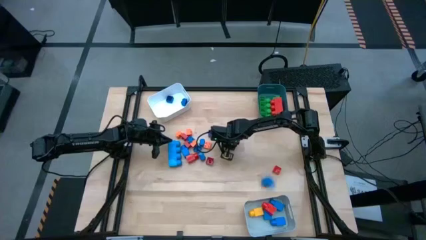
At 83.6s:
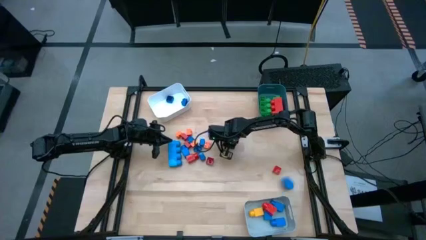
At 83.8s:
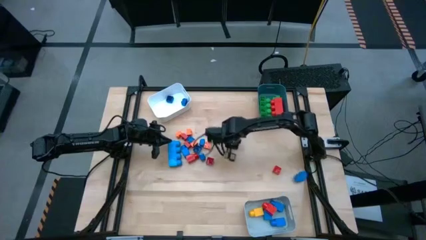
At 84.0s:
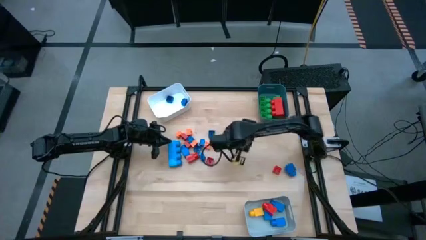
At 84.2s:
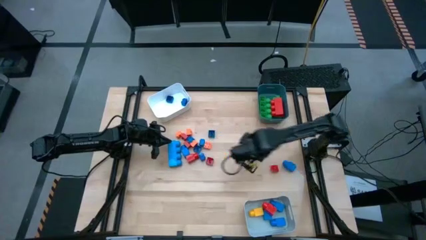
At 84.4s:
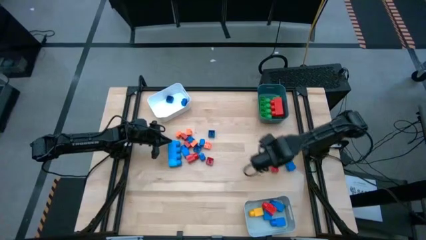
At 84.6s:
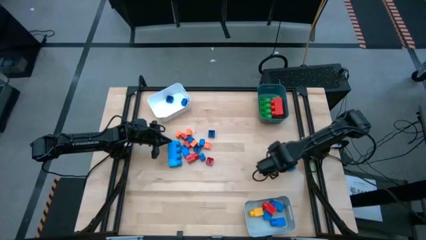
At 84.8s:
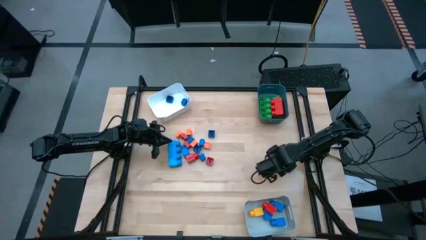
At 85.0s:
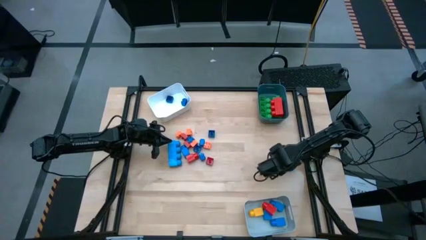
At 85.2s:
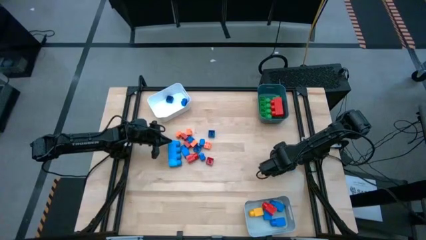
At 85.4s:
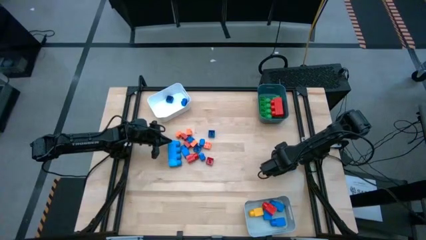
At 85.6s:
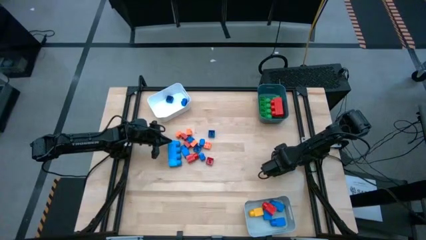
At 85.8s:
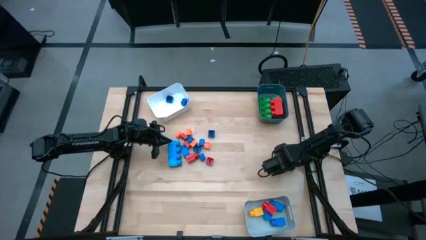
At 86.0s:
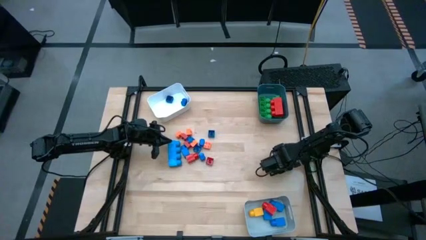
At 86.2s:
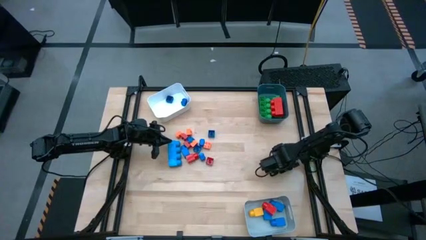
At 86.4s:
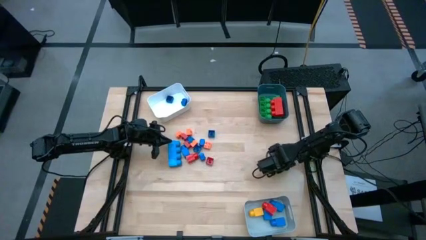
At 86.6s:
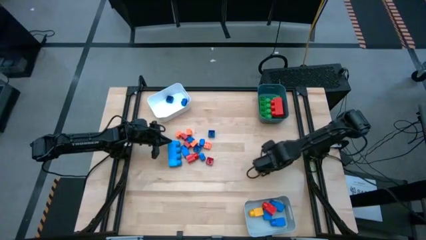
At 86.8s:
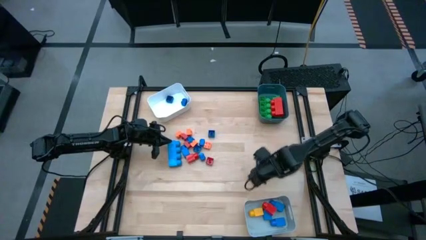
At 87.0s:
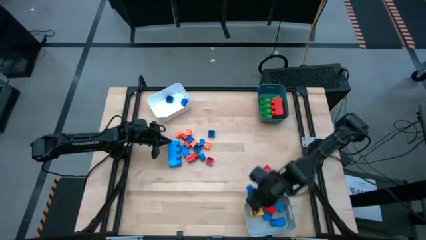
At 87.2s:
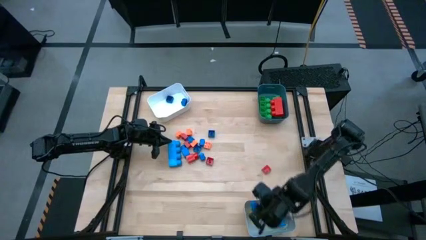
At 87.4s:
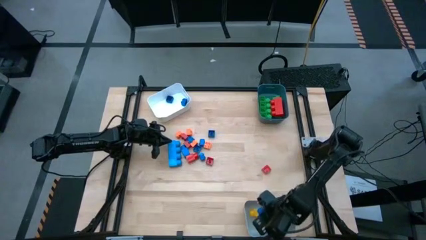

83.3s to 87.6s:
Task: Sort blocks by size
Put the 1 stud blue game piece into the gray bin

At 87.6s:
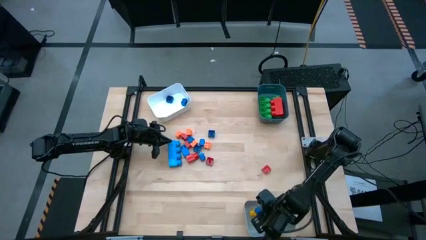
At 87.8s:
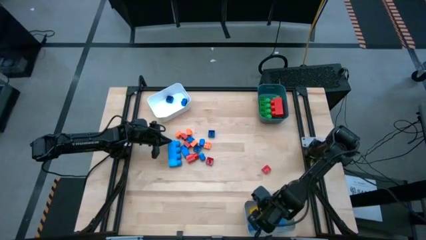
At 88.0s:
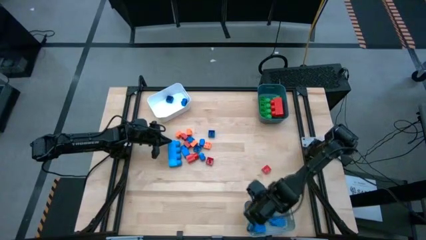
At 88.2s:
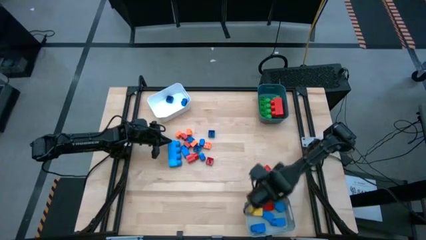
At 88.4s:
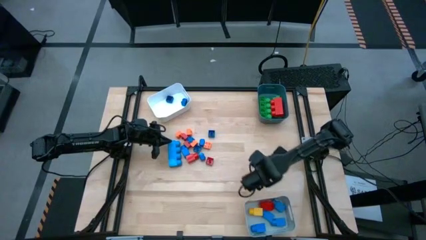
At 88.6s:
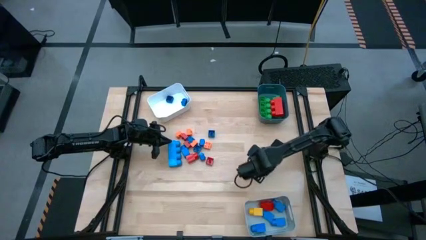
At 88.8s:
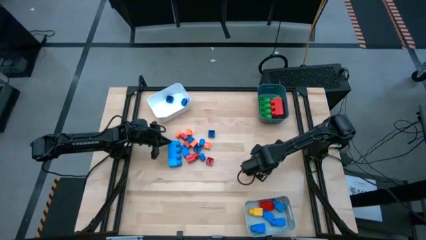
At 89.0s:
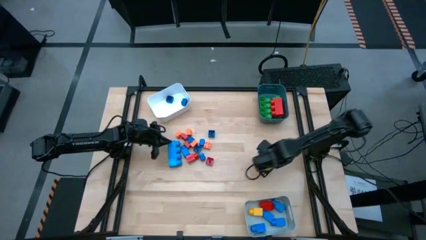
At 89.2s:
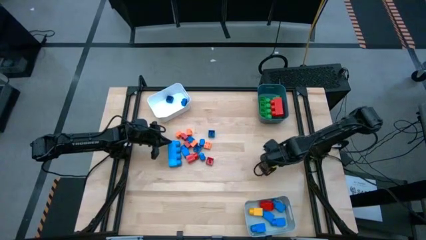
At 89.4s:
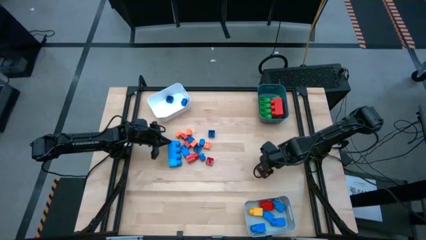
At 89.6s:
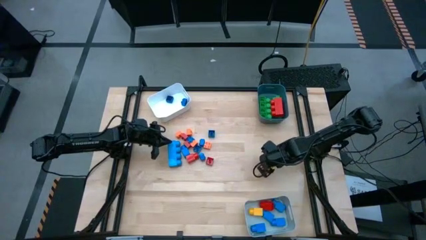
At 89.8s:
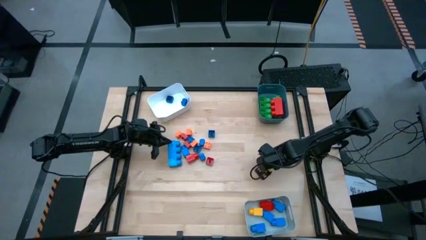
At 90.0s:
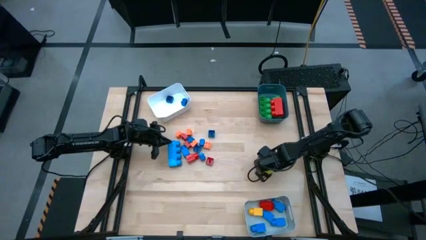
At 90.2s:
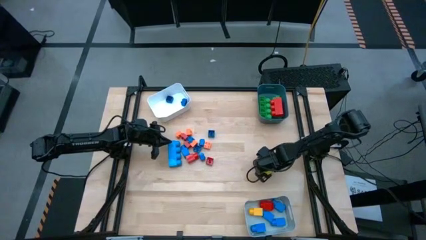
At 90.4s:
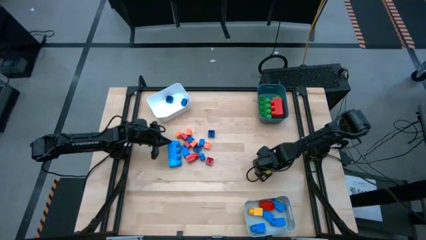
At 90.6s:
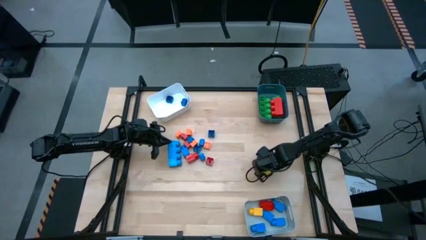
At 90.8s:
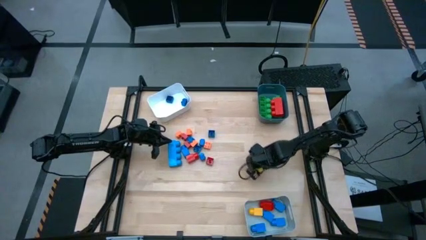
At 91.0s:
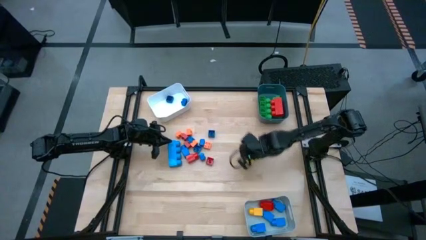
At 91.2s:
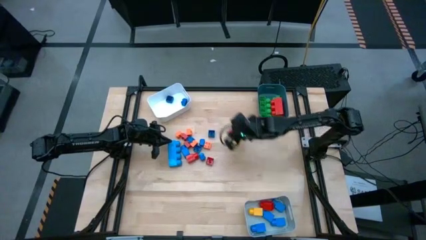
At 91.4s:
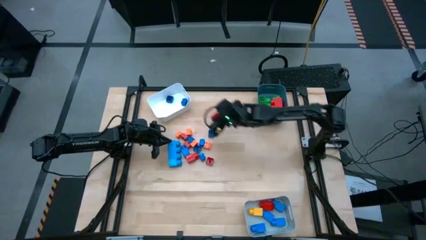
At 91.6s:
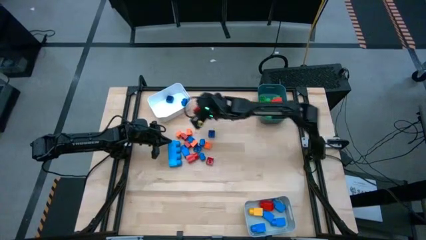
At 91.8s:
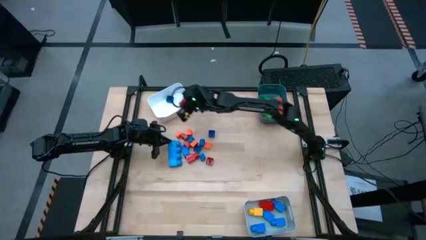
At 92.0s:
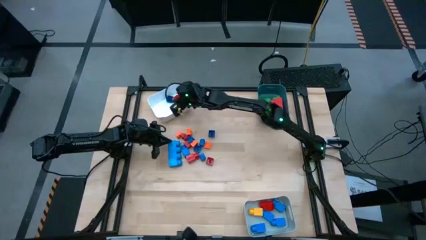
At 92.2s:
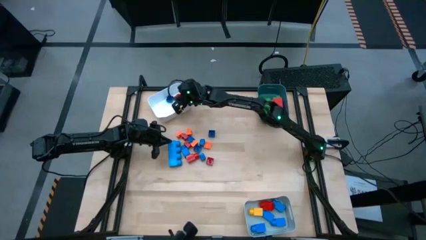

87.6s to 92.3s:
Put the small 4 stud red game piece into the white bin

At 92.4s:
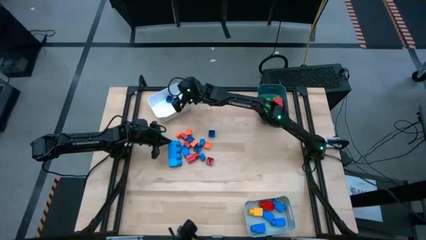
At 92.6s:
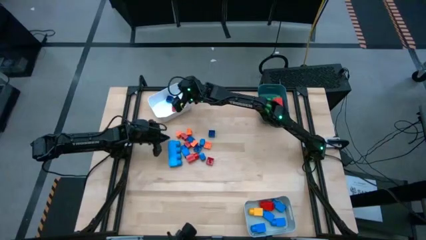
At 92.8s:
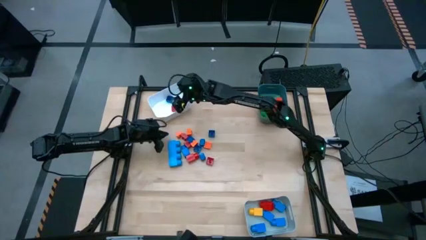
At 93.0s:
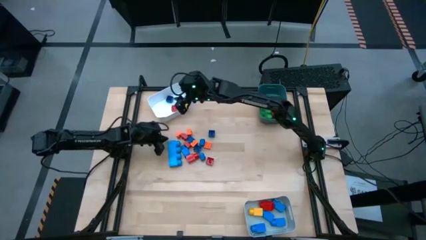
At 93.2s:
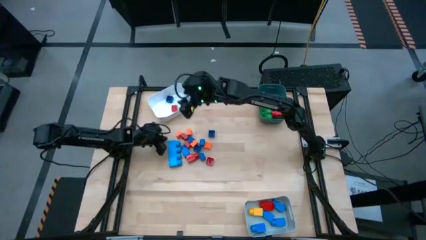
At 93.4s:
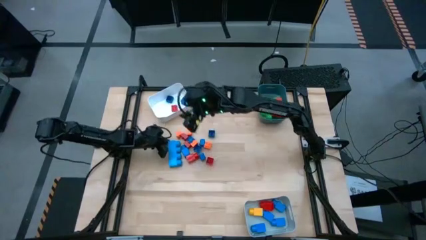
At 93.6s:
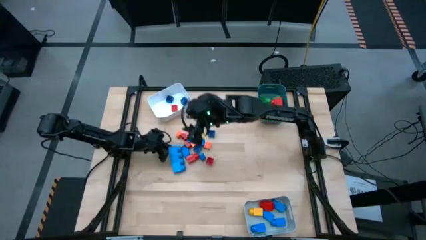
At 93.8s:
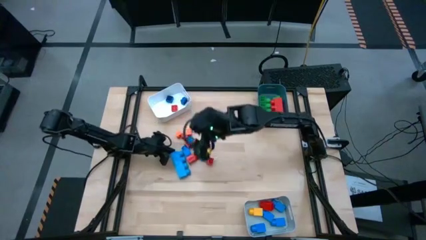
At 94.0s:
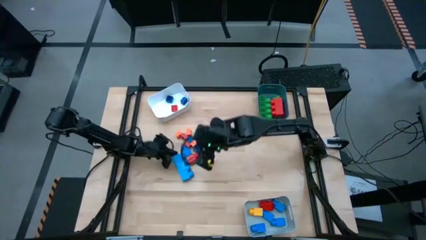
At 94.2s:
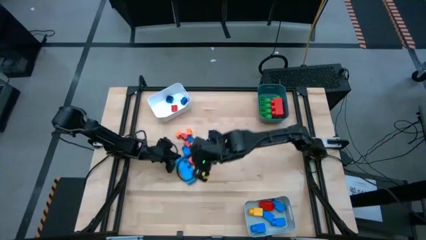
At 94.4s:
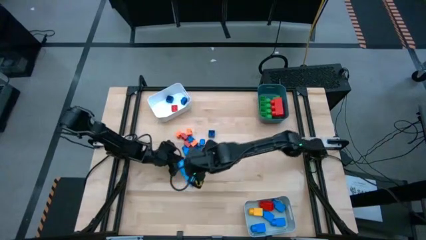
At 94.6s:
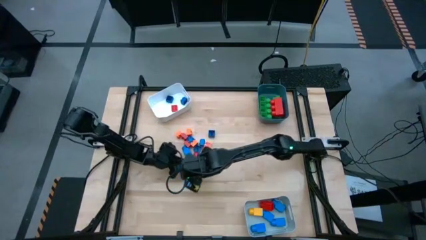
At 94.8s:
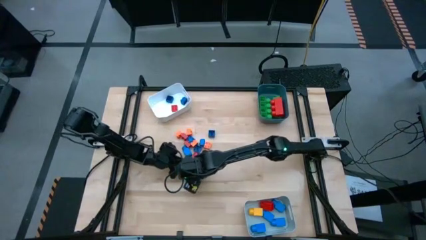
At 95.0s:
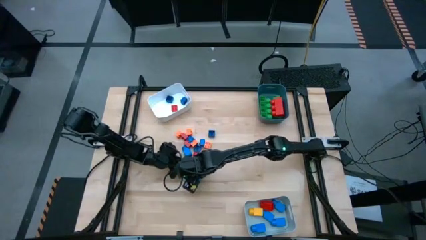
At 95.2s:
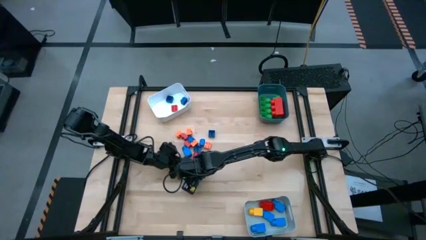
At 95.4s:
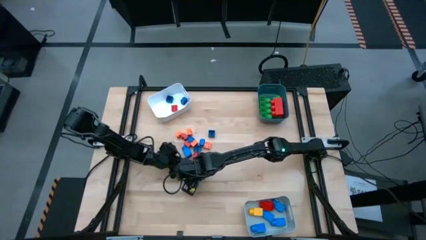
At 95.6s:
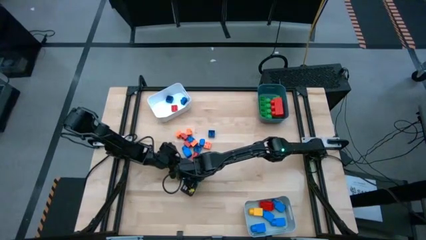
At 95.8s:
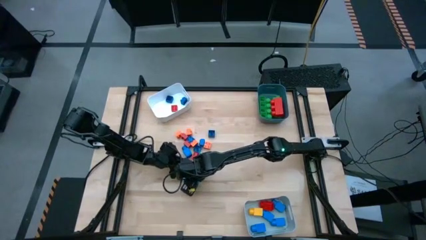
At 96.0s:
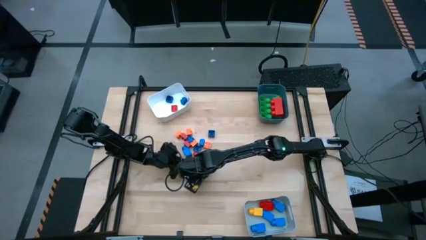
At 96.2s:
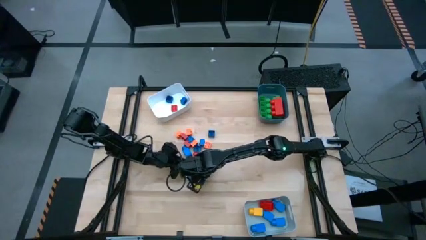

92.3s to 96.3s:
Put the large 4 stud blue game piece into the blue bin

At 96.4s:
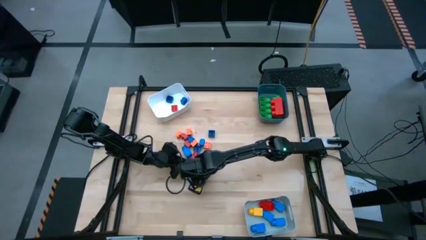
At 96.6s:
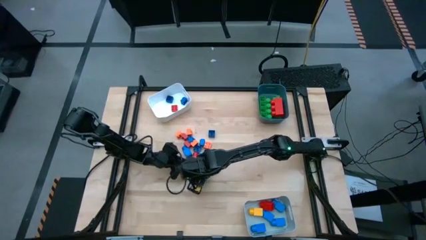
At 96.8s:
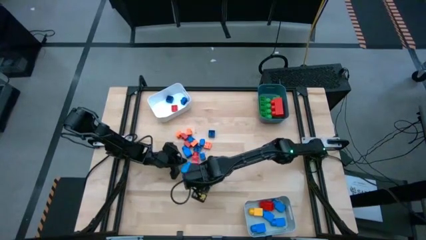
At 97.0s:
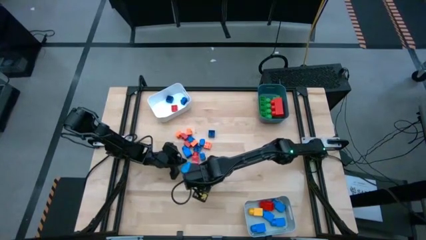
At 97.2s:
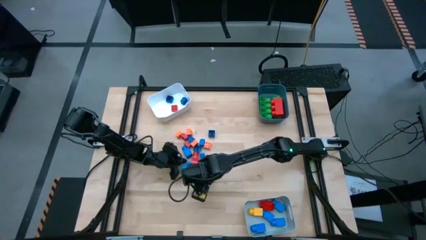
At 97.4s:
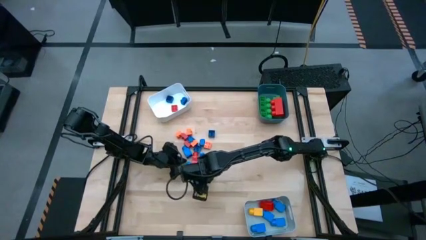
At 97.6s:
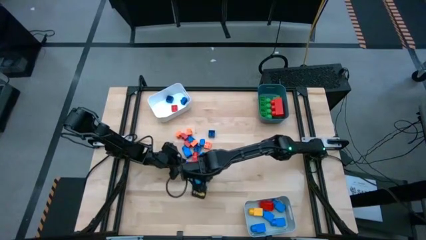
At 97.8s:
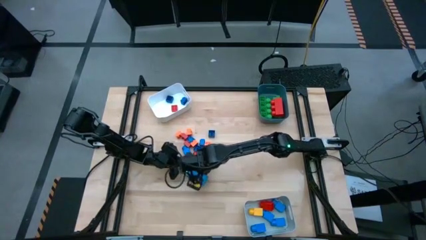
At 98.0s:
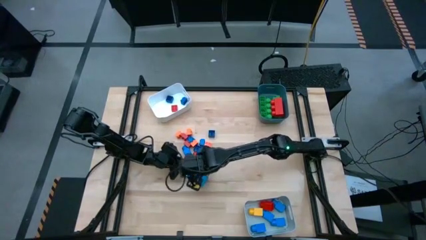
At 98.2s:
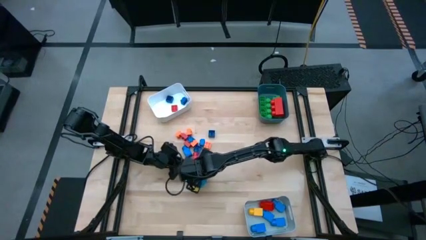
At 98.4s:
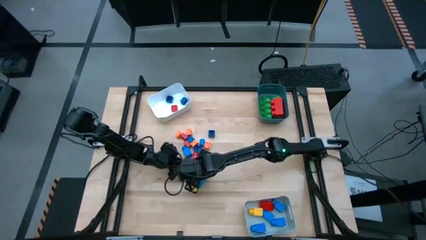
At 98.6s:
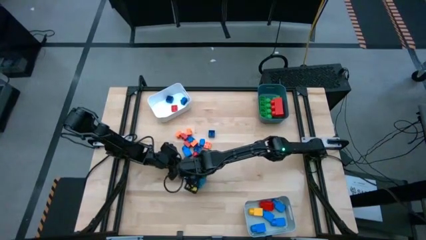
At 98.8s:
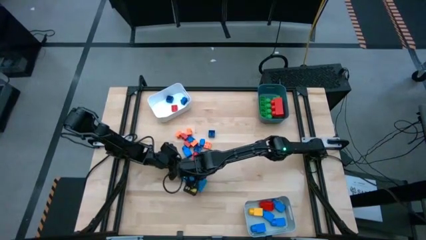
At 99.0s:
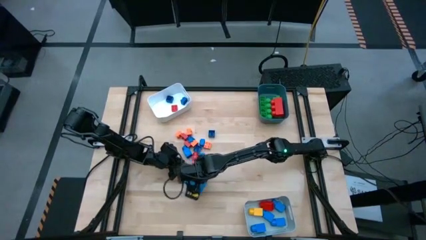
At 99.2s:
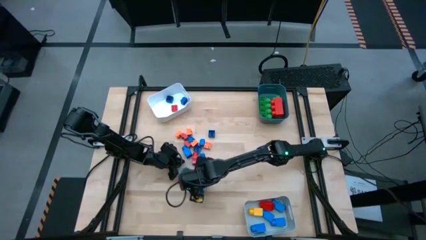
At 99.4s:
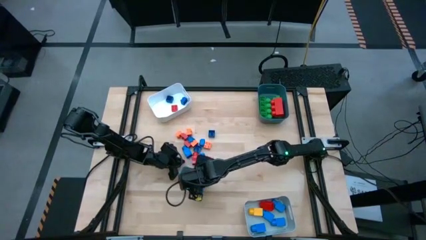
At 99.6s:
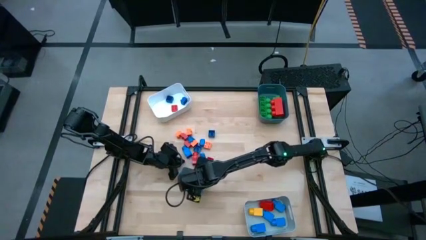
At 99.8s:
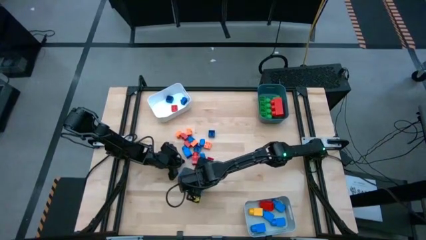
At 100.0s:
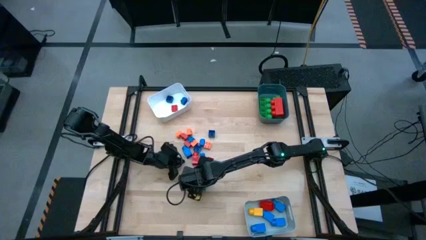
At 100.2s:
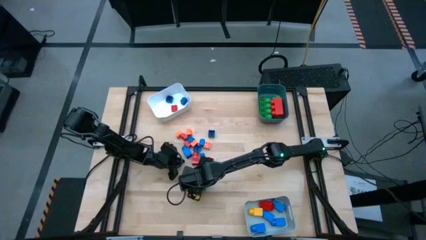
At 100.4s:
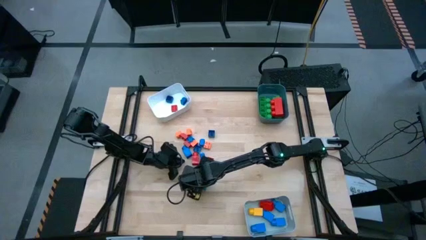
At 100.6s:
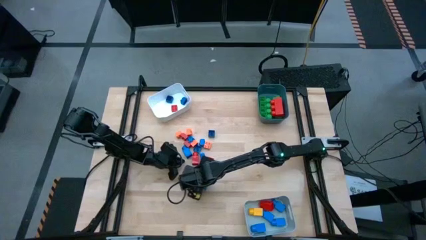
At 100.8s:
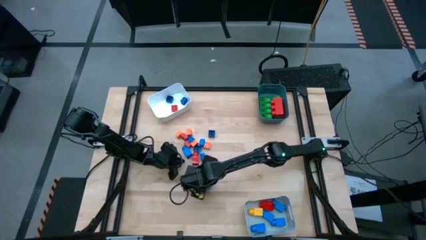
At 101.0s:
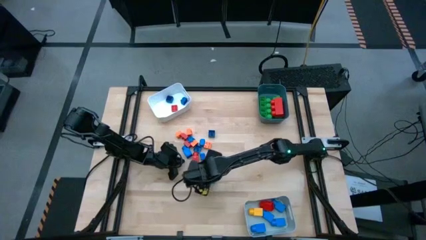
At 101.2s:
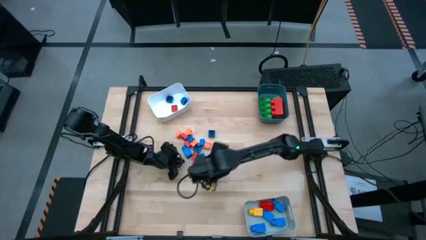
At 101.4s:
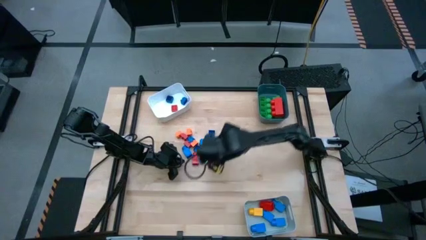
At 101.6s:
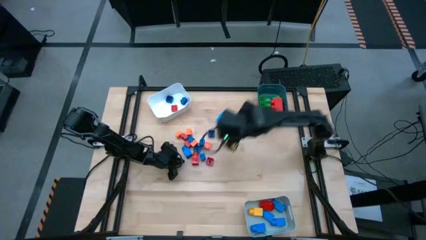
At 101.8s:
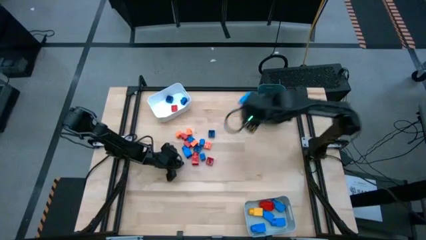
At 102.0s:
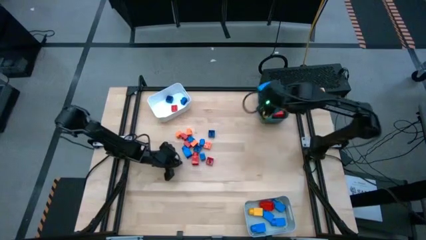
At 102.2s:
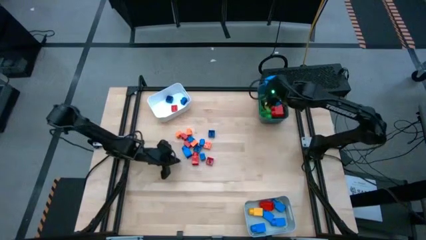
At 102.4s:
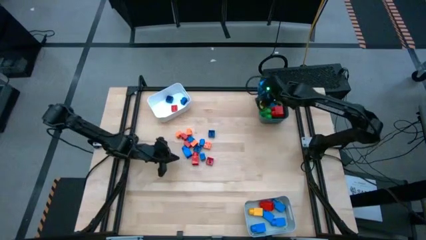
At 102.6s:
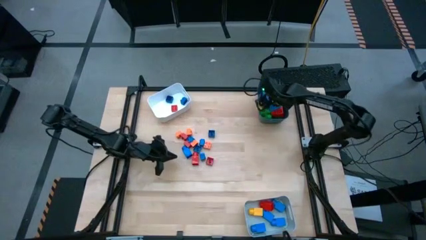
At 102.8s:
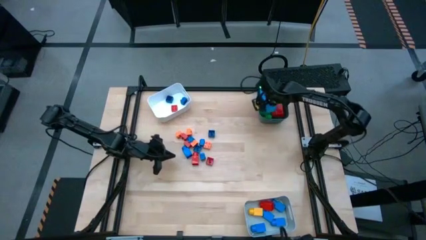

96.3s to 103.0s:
Put the large 4 stud blue game piece into the blue bin
